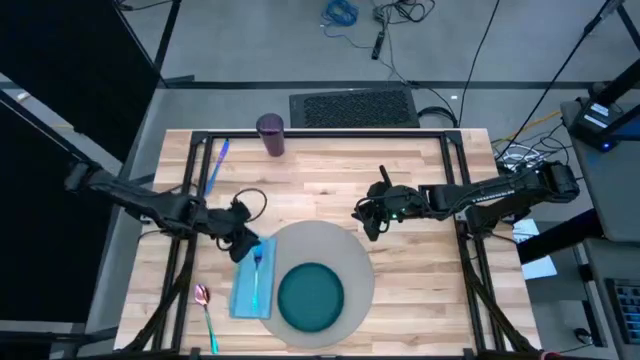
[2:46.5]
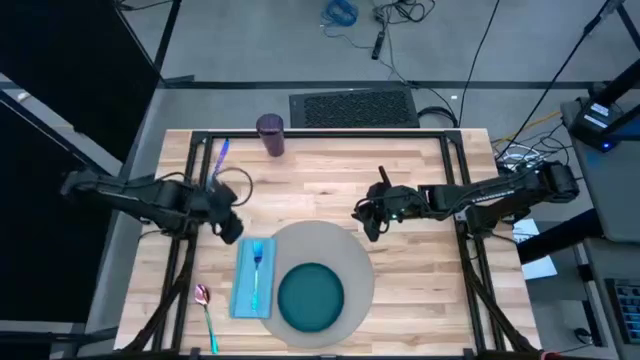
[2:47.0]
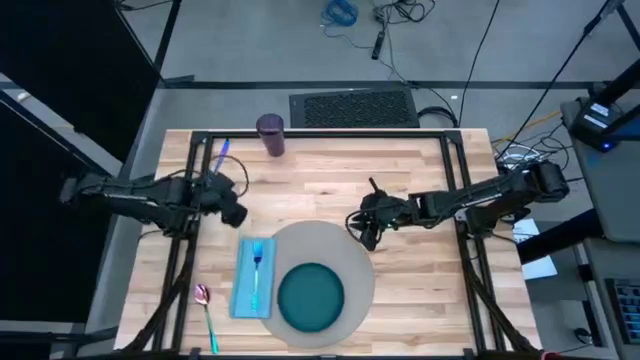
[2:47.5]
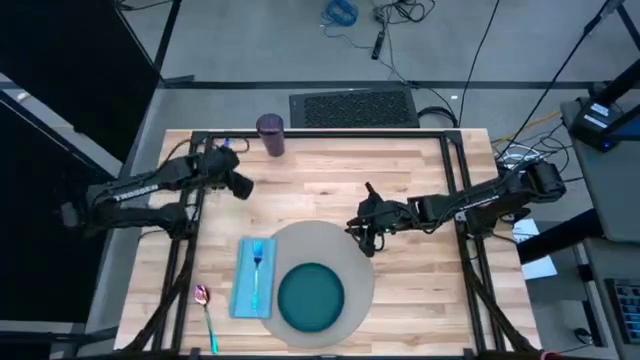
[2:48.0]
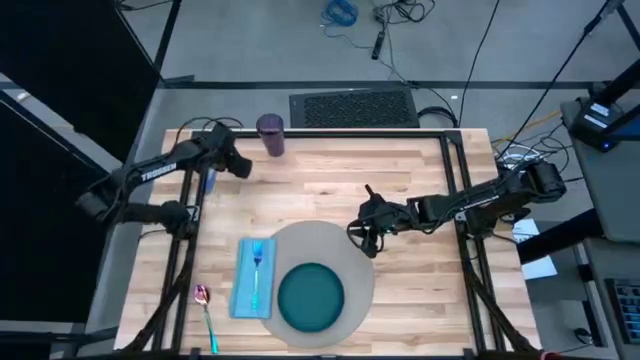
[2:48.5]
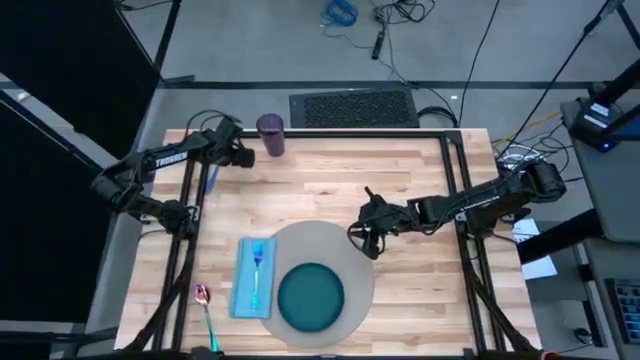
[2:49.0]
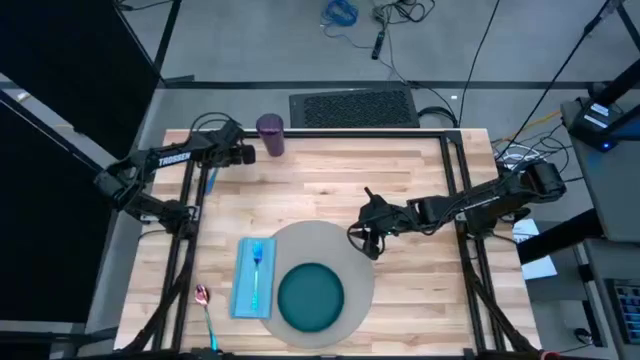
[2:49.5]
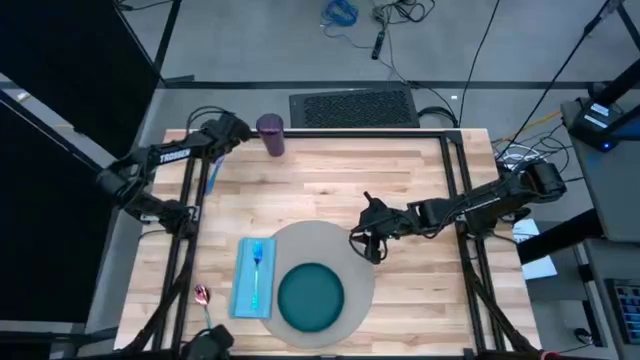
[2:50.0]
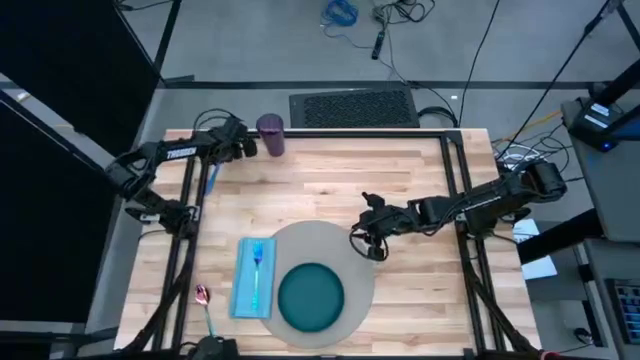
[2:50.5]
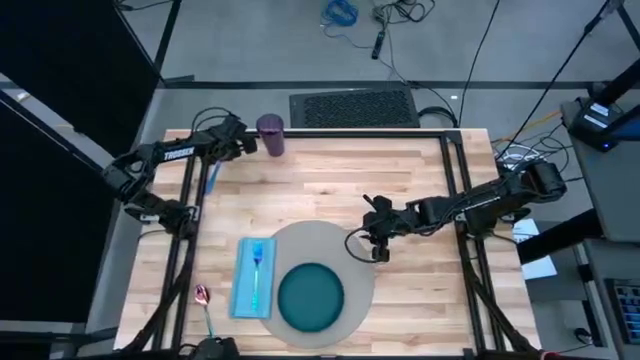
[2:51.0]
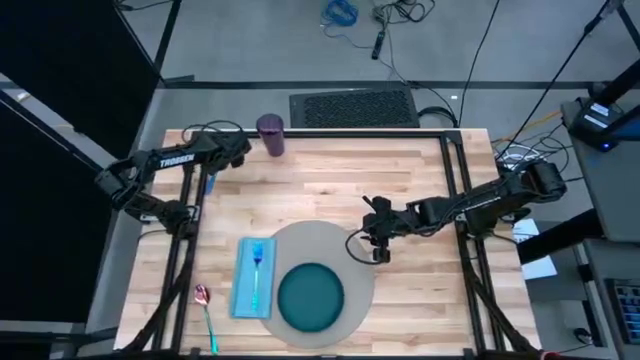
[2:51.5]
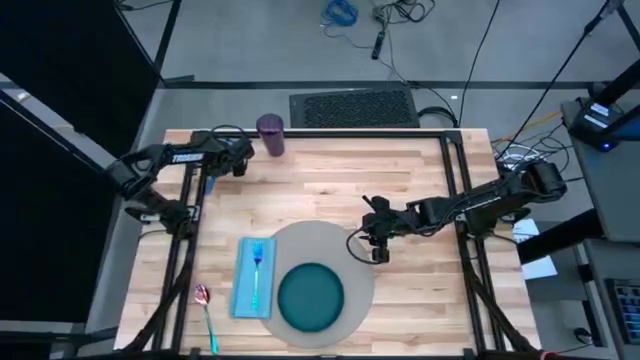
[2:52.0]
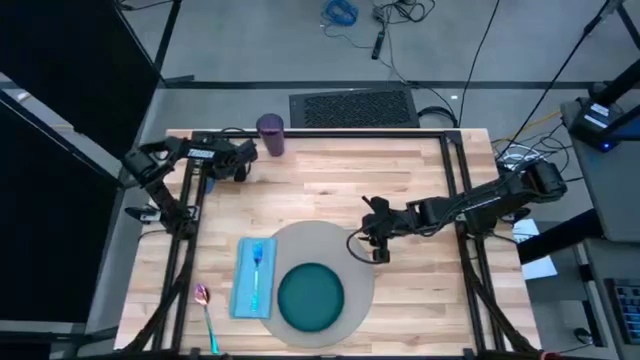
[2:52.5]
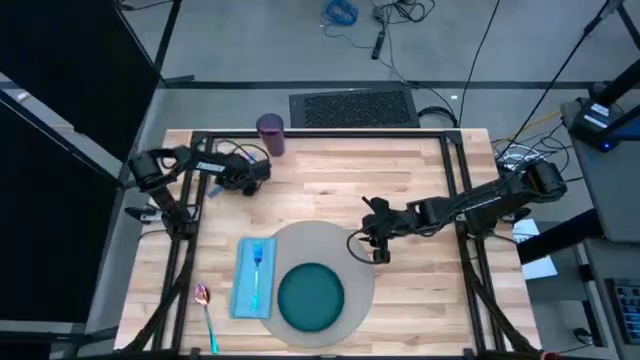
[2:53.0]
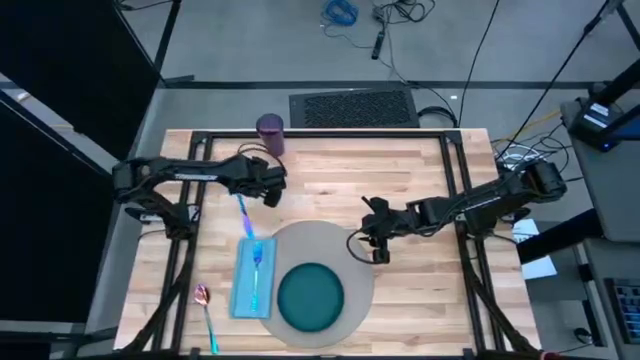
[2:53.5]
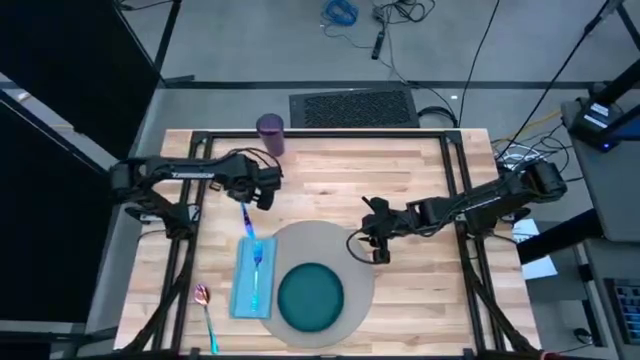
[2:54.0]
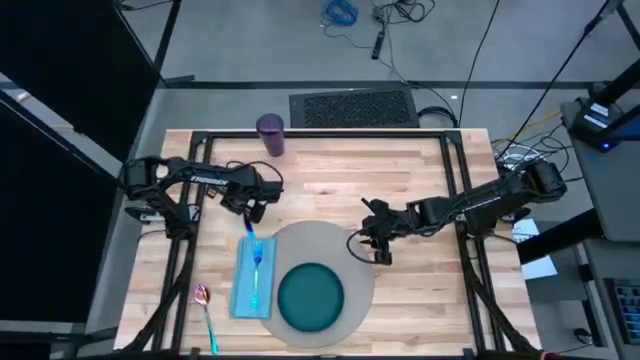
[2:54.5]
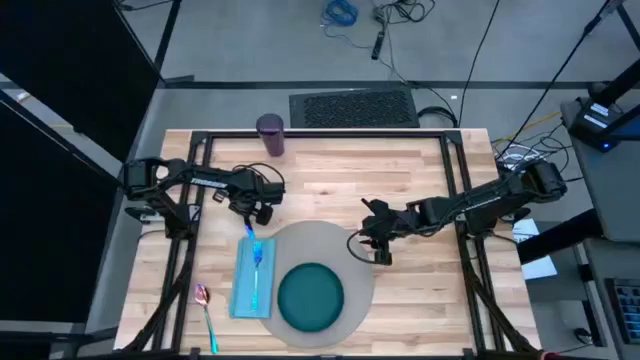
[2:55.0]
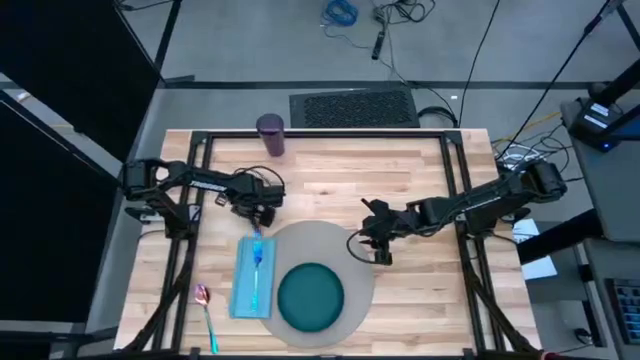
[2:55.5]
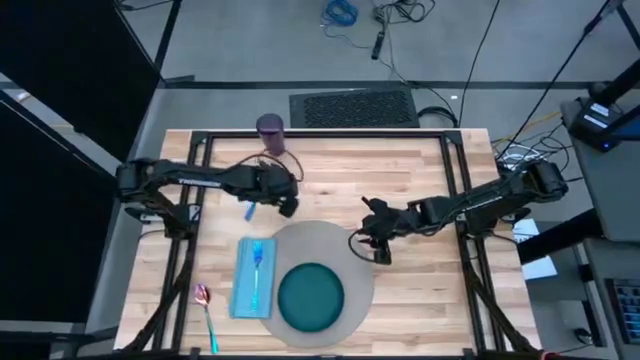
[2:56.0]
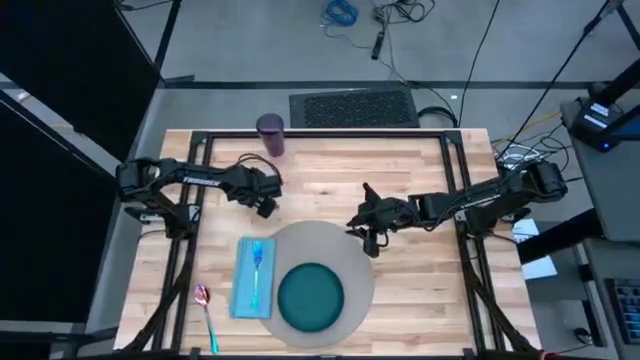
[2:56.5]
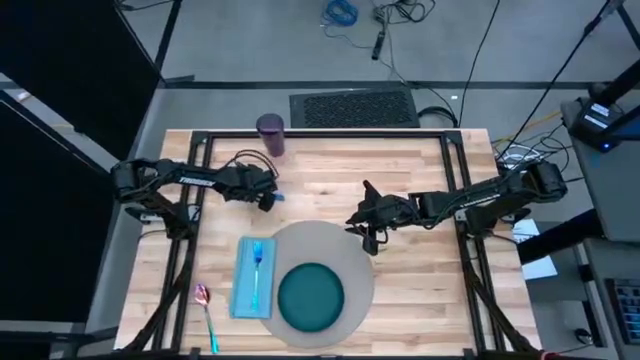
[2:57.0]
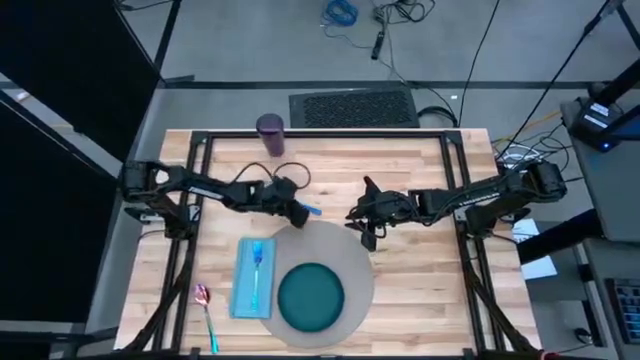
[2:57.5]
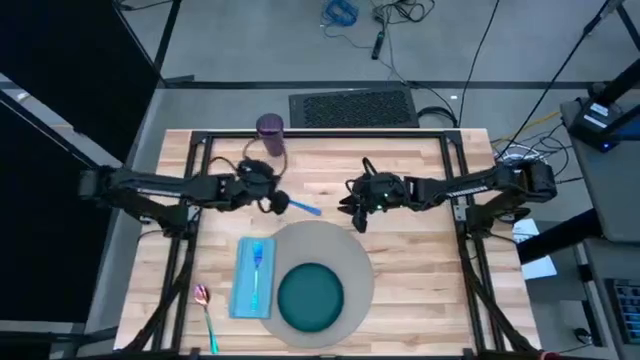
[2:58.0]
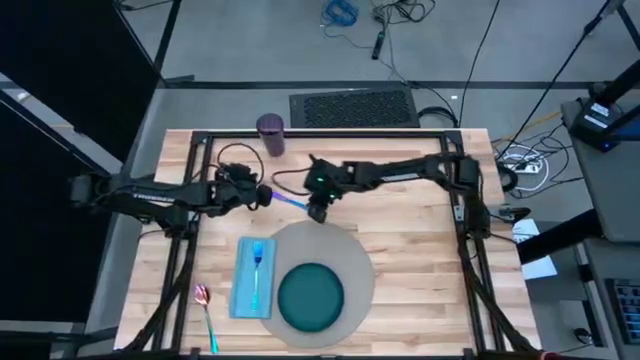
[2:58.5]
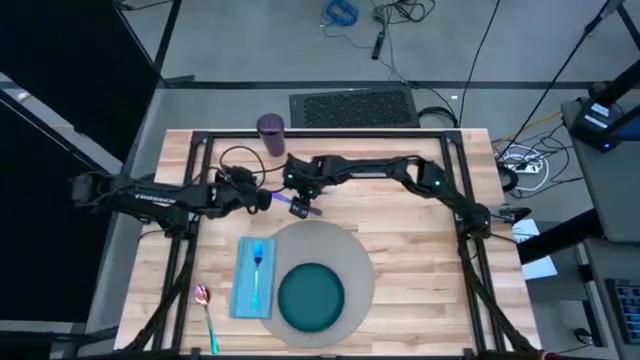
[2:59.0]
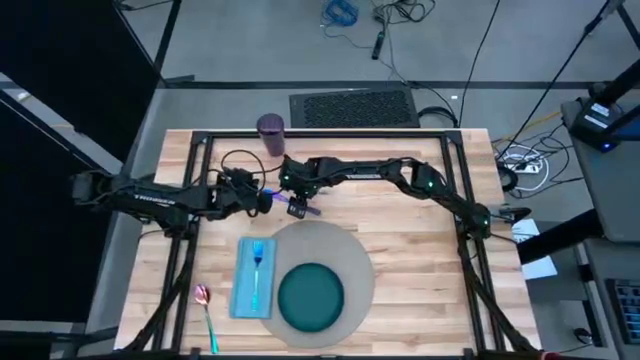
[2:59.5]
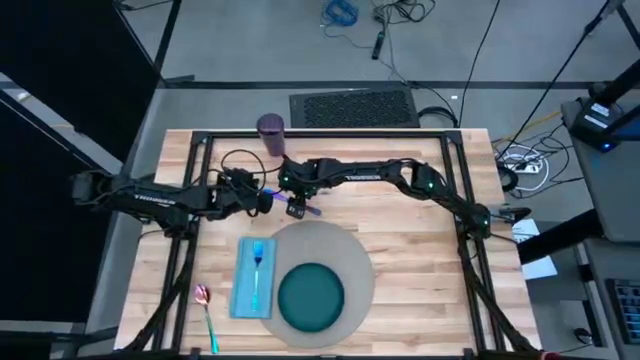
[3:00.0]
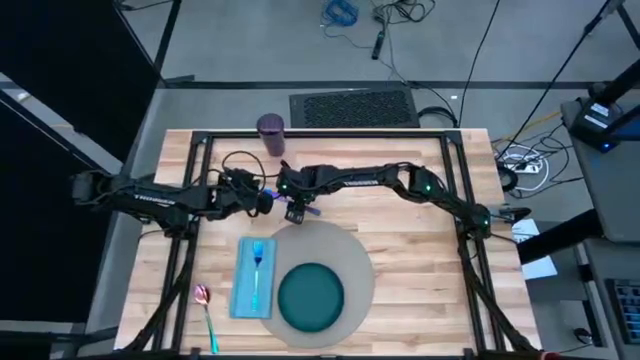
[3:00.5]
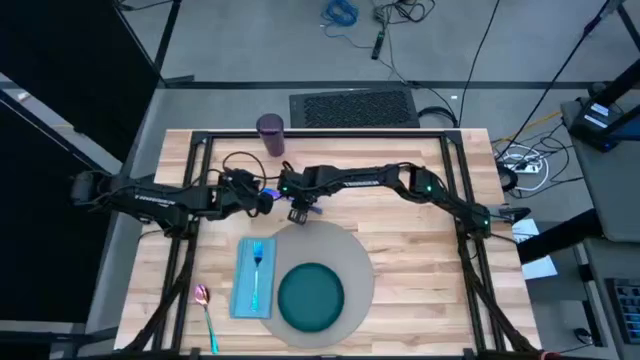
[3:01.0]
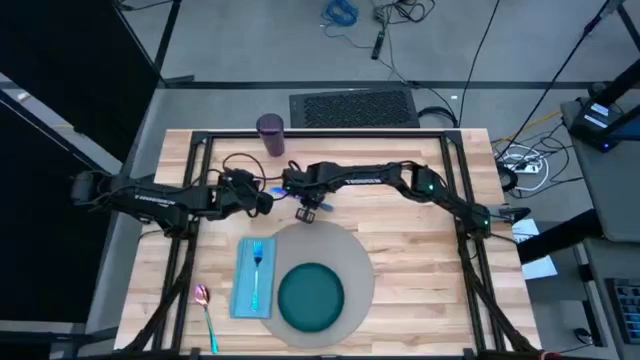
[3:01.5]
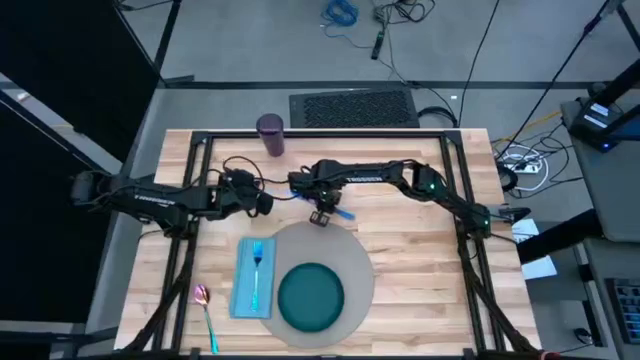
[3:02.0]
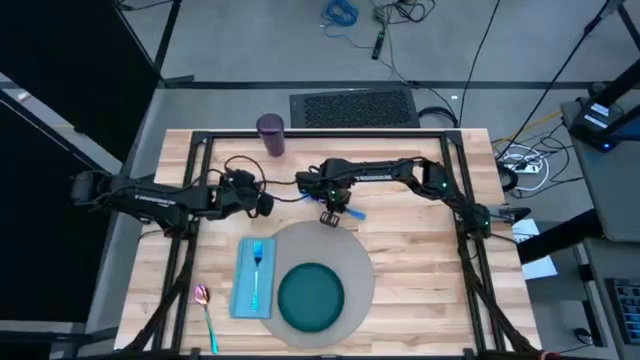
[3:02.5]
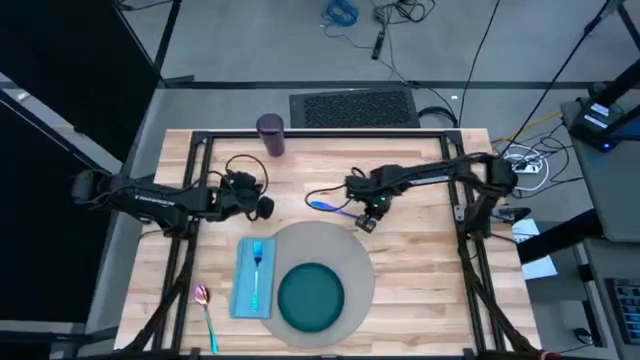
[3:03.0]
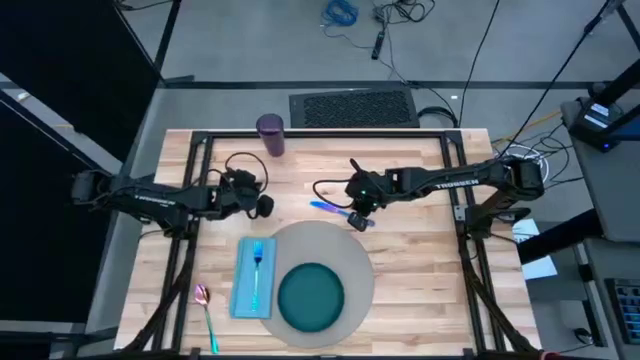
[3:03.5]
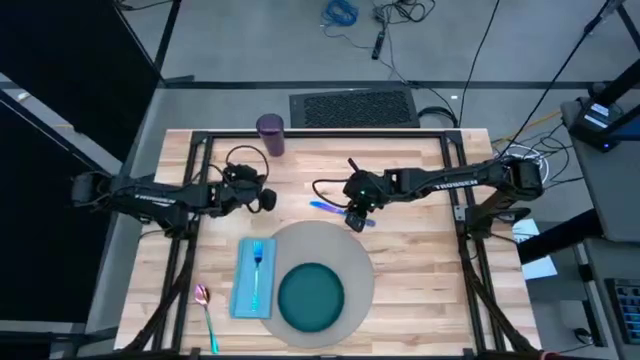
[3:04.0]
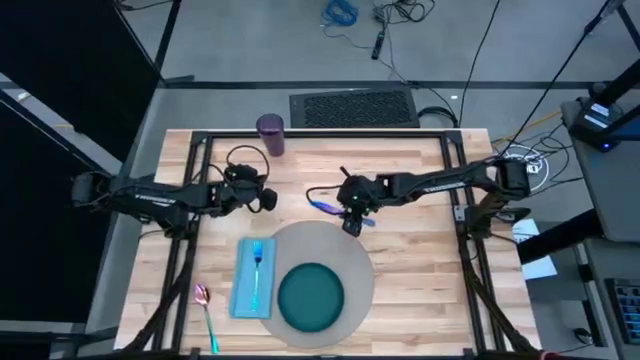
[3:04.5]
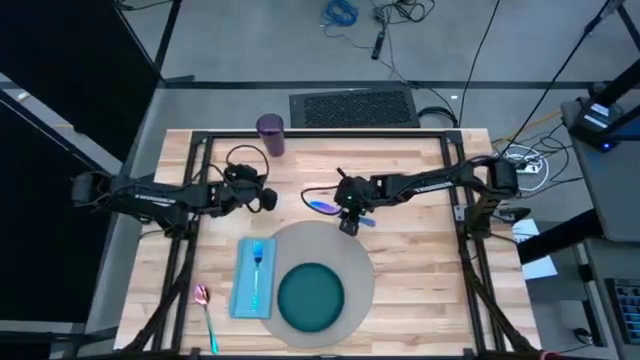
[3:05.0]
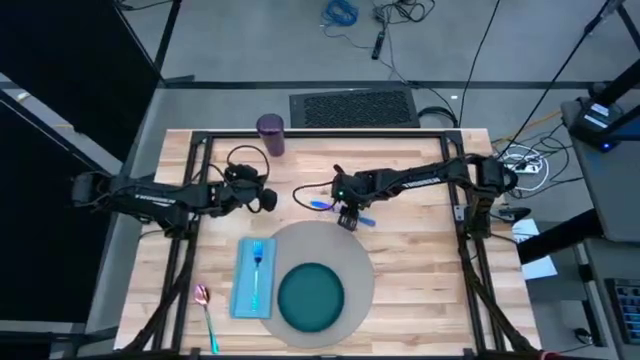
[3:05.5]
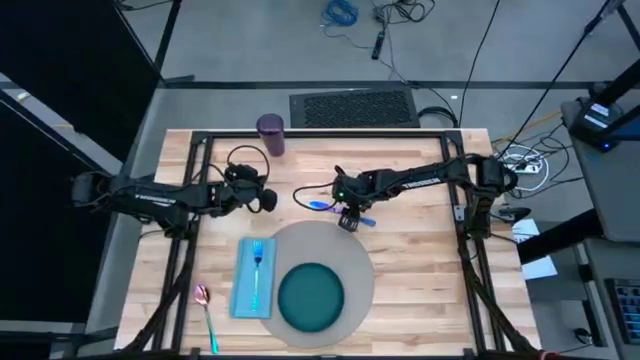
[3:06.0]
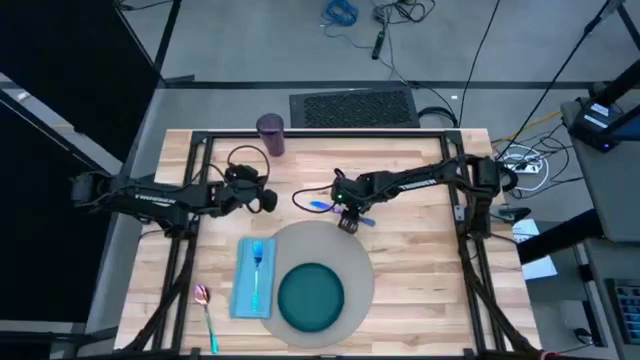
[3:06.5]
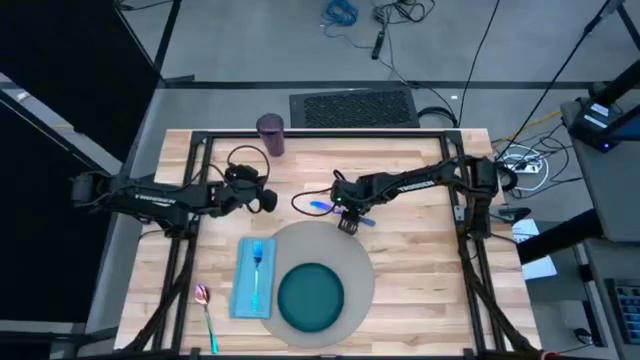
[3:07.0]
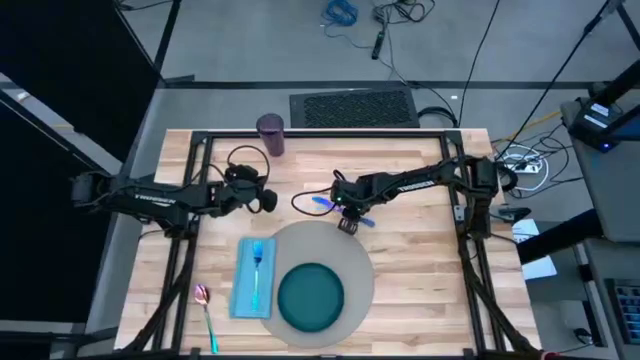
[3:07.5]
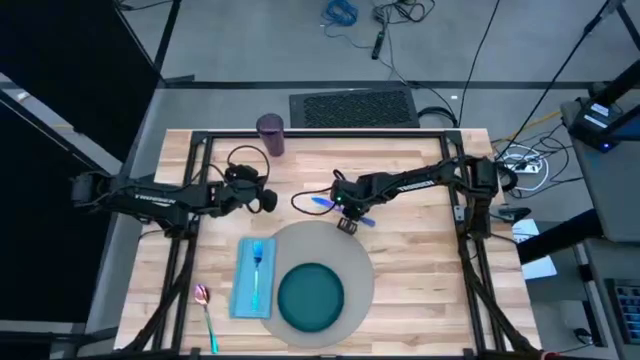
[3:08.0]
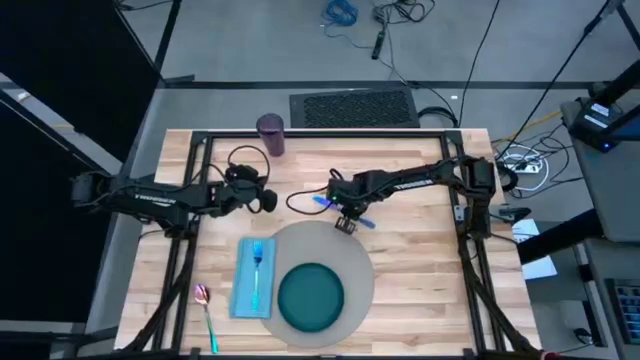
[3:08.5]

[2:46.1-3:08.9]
Task: Set table place
Move the blue table knife to the right of gray placemat
